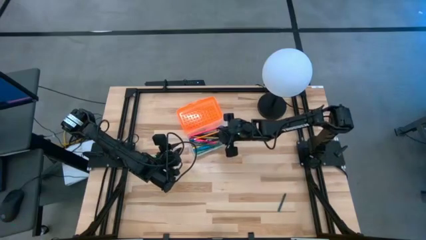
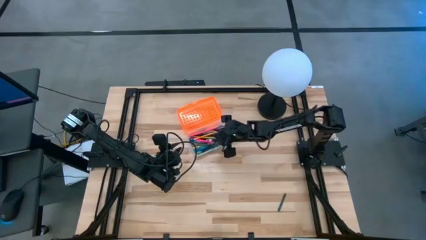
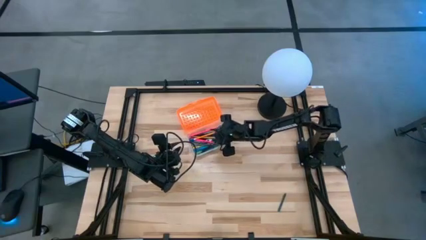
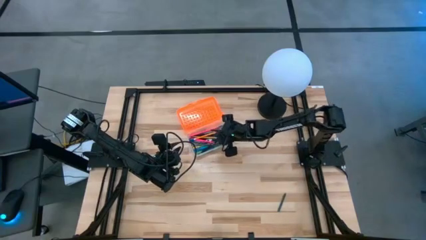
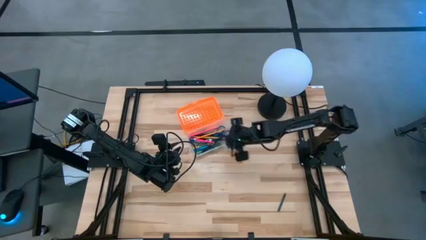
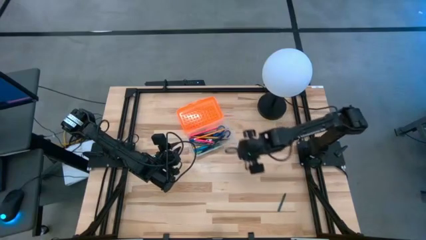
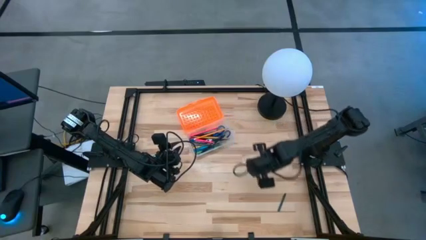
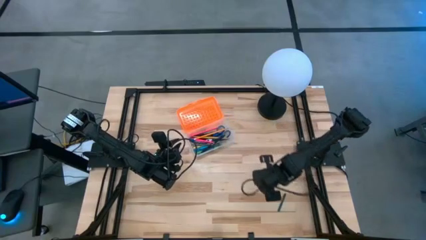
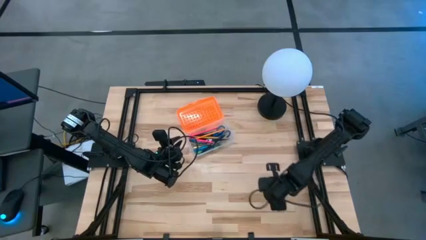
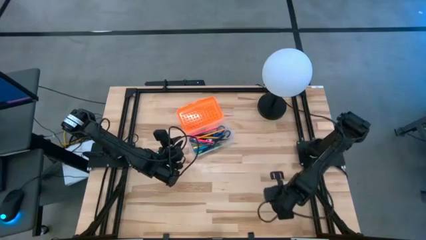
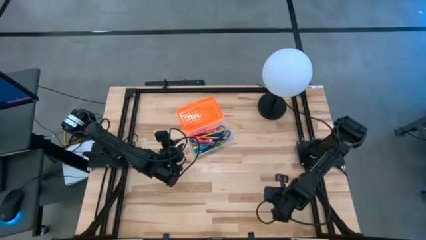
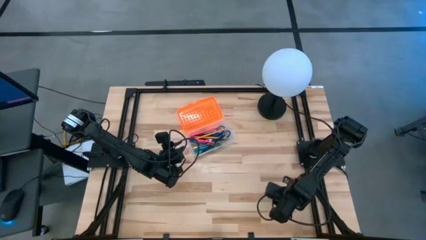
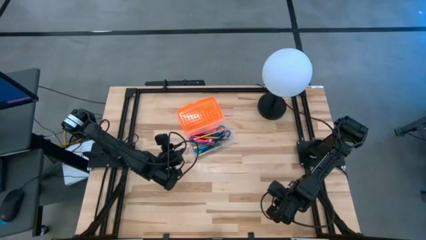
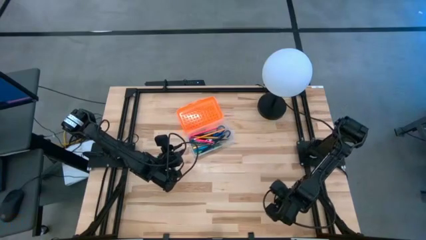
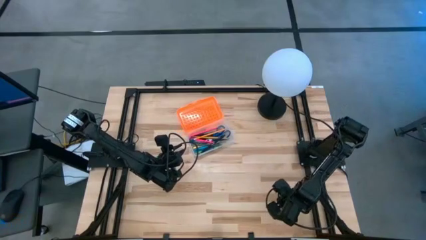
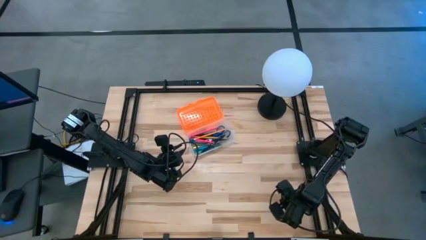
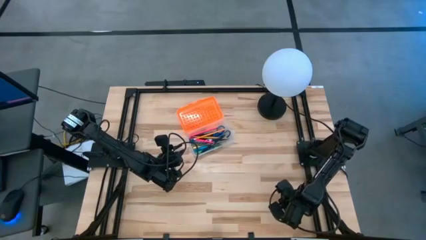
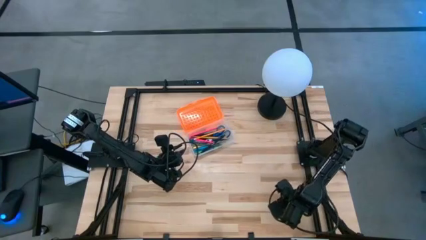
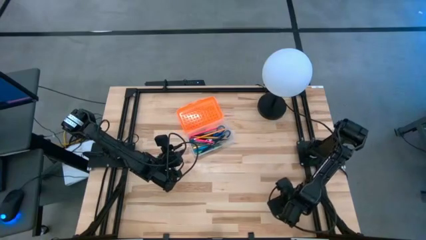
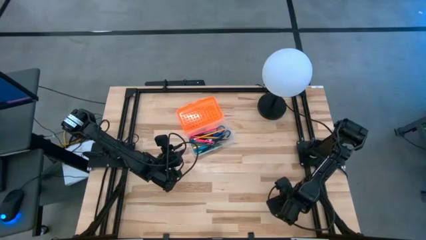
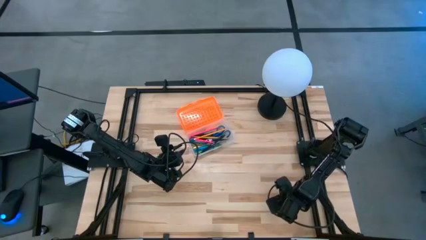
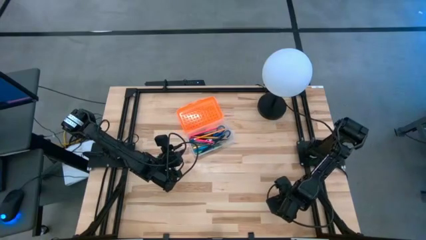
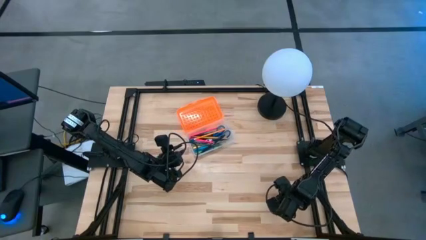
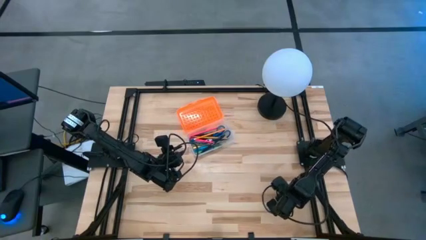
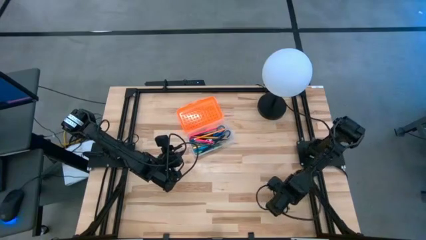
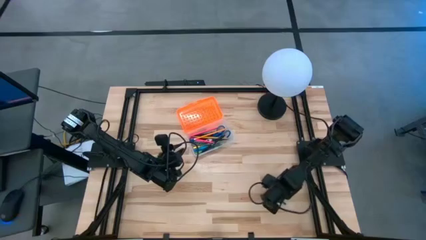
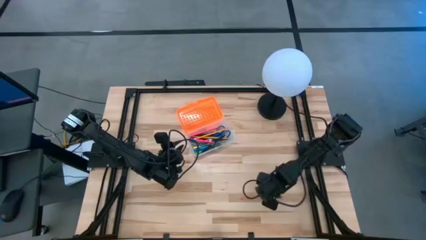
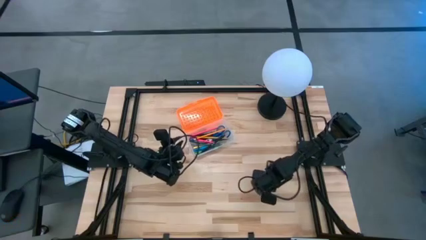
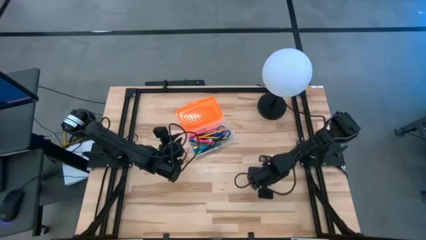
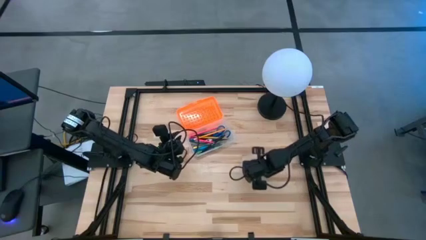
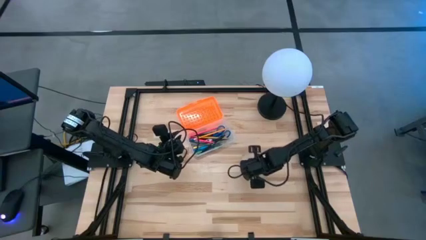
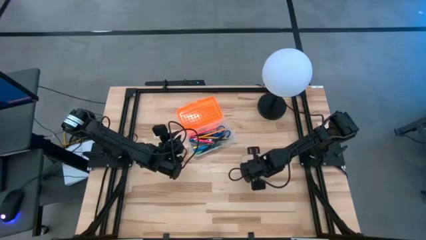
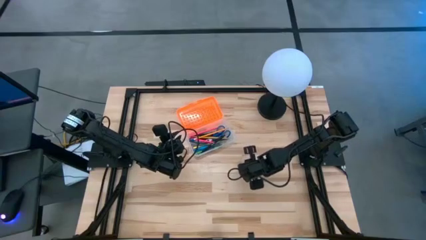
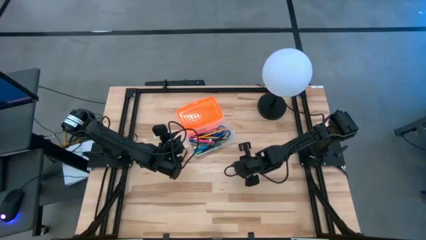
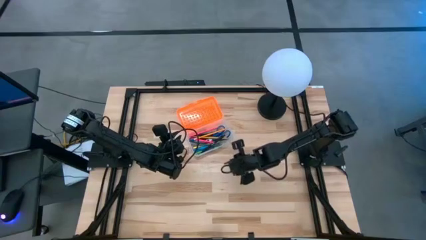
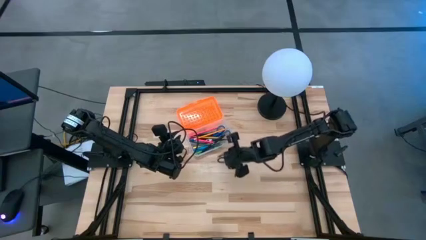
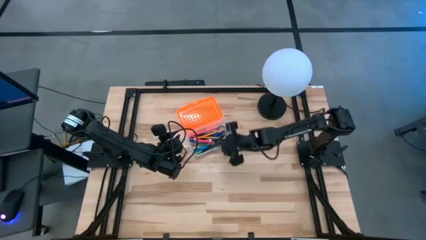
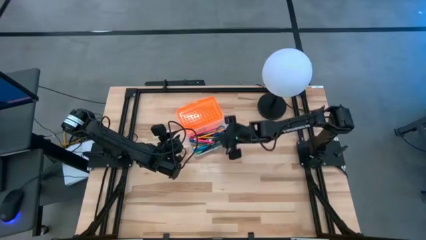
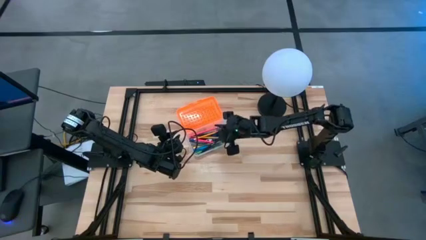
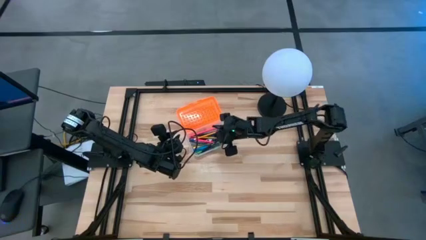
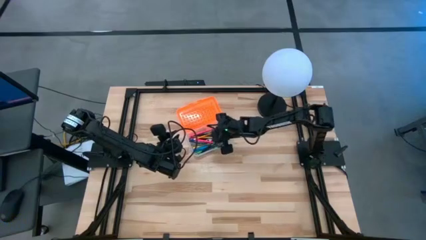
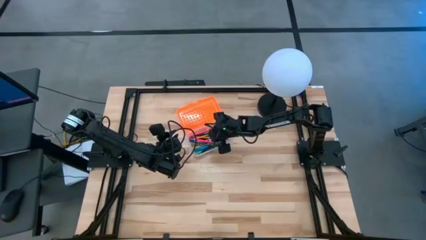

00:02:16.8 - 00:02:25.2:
Task: Pick & place school supplies into a supply box
Put the green crayon into the supply box

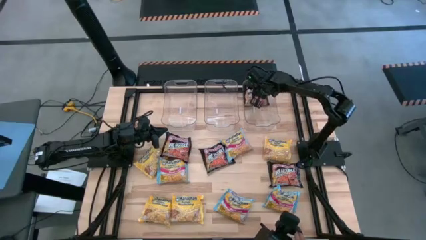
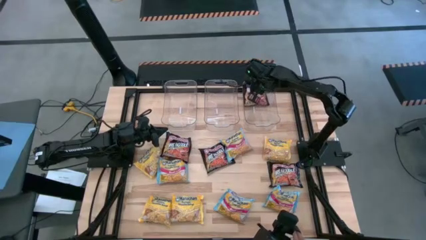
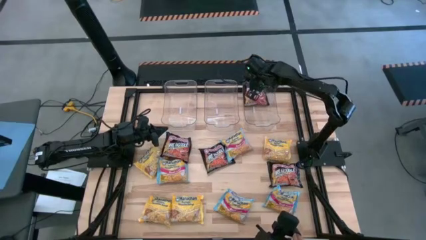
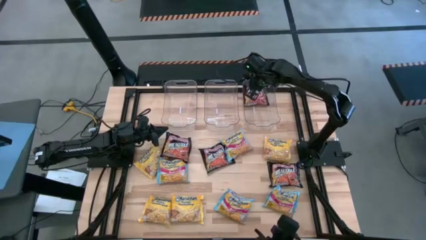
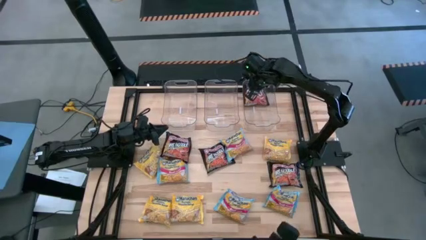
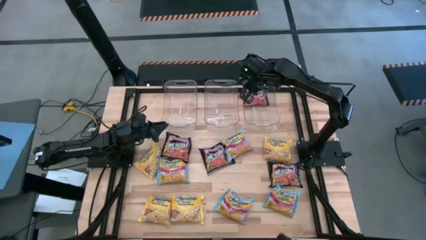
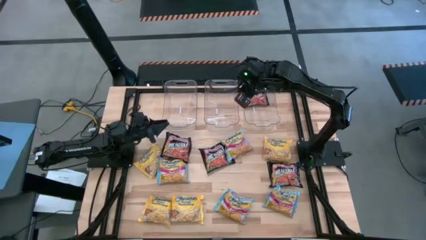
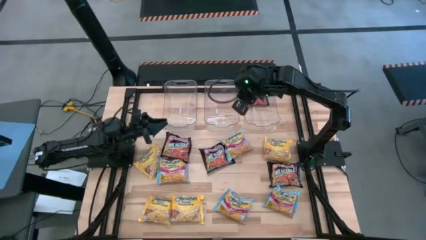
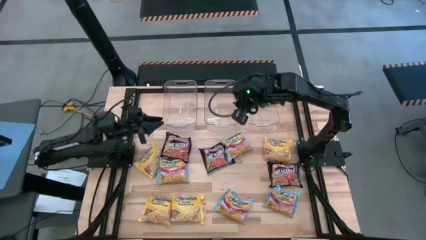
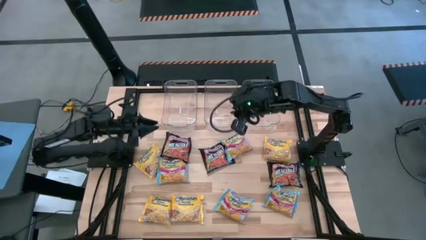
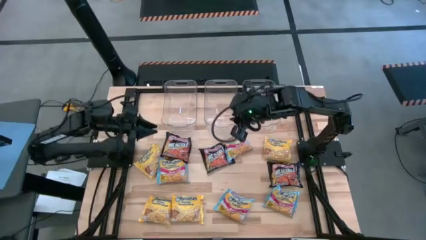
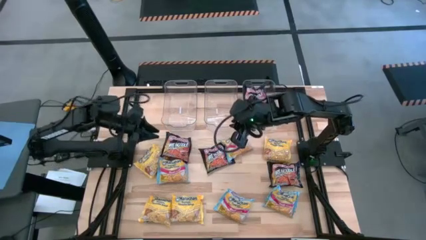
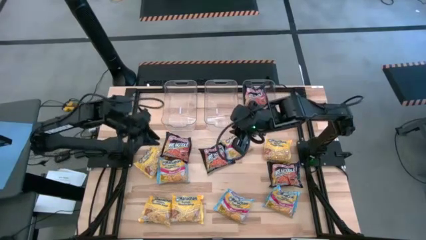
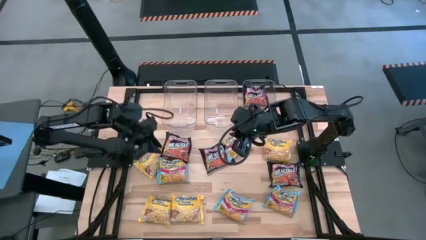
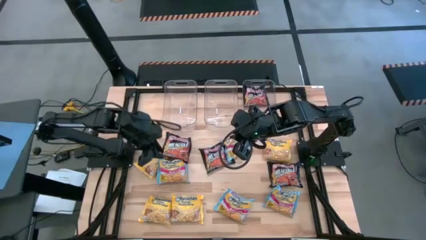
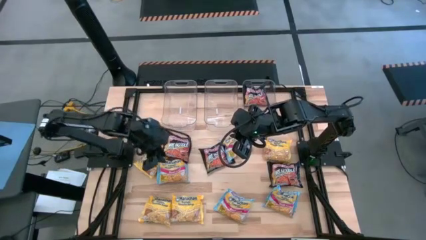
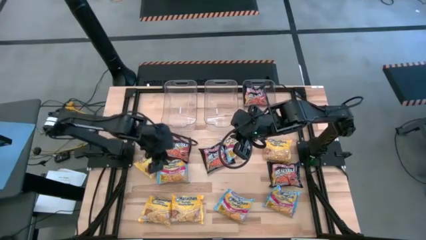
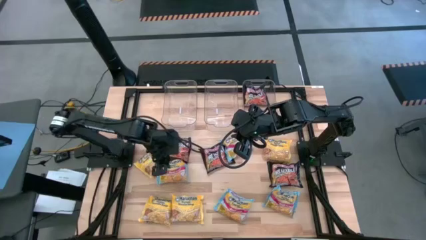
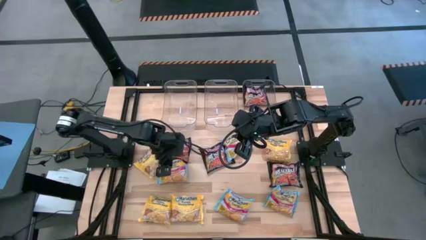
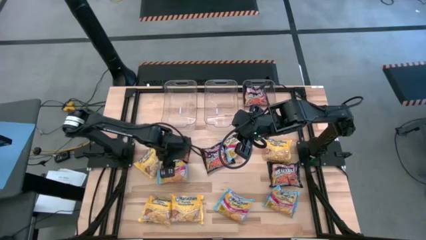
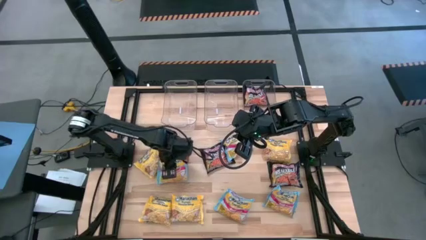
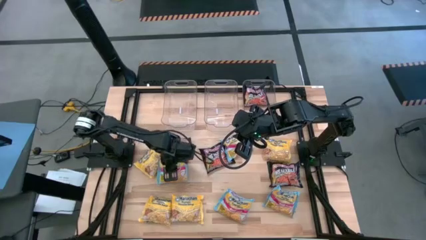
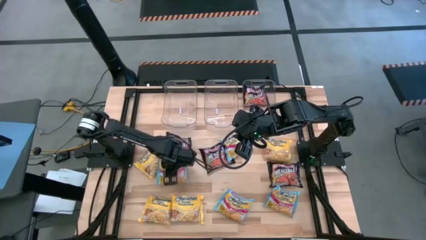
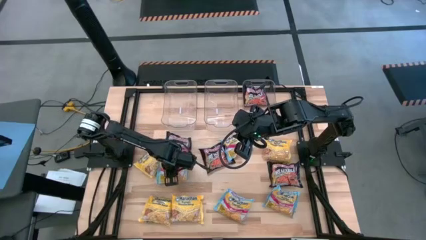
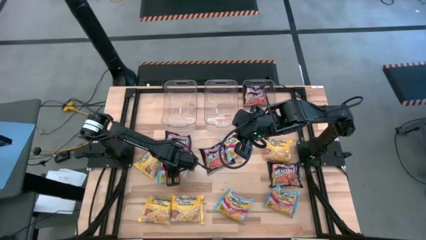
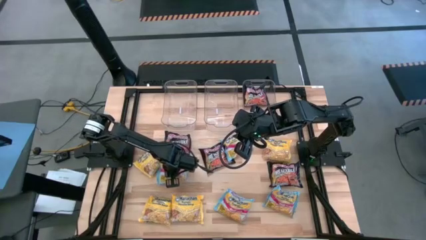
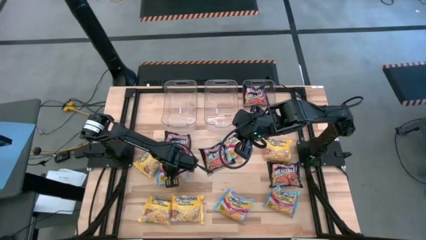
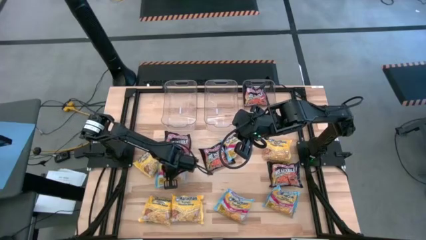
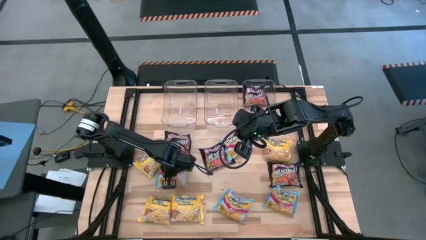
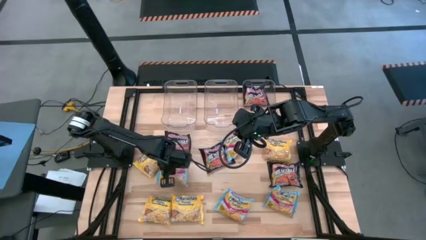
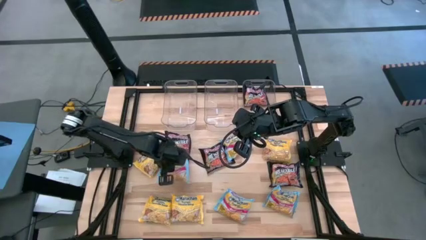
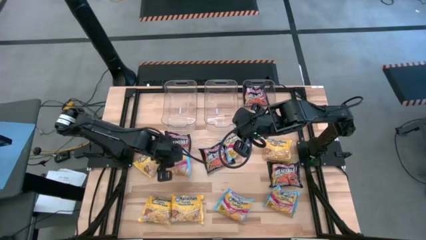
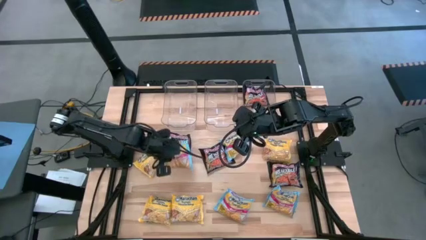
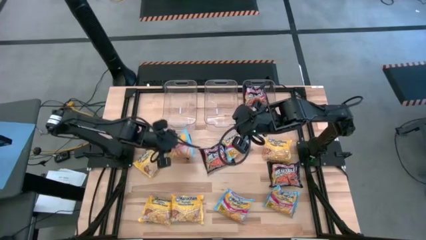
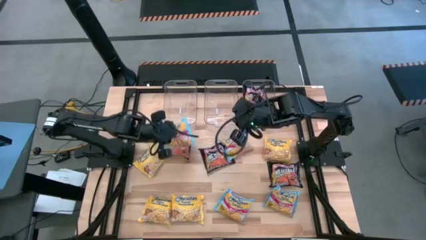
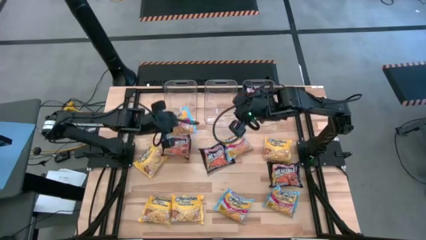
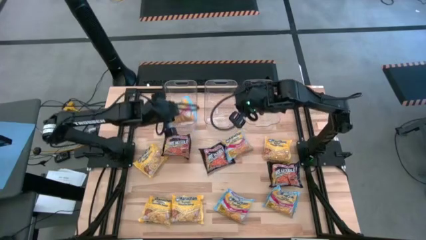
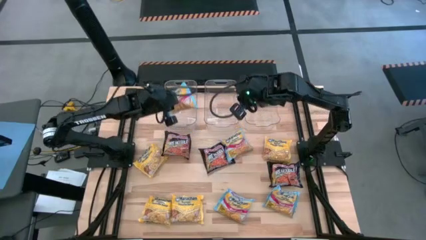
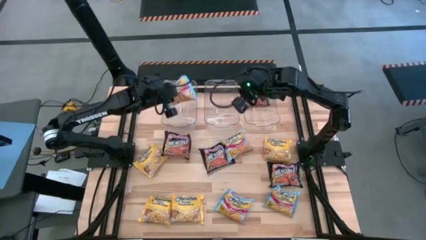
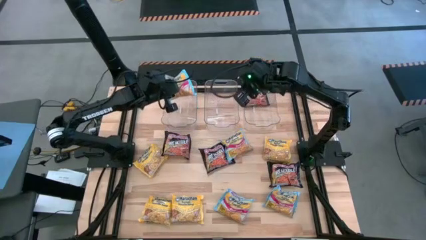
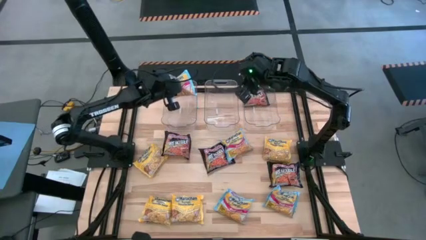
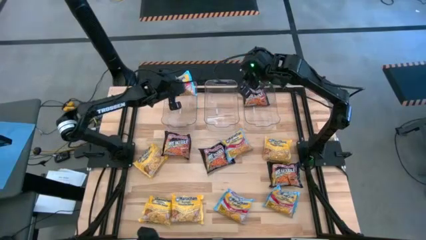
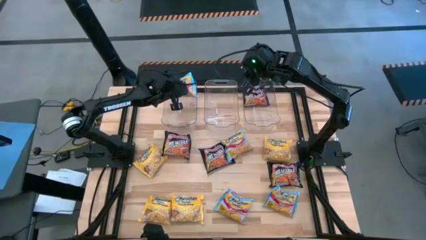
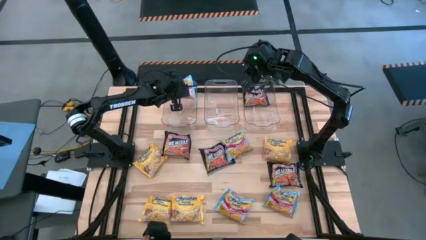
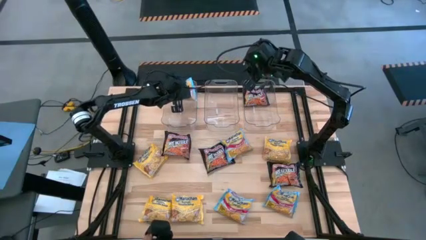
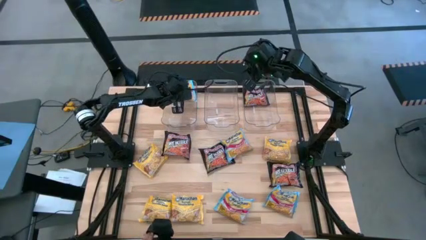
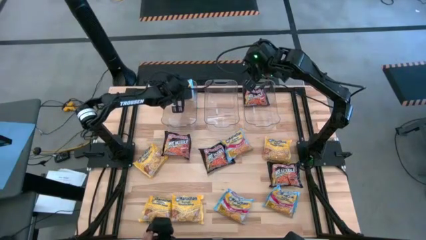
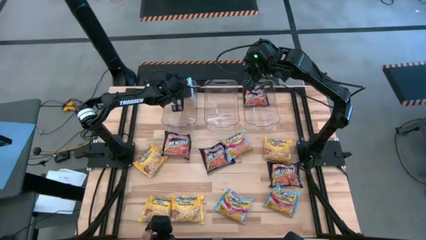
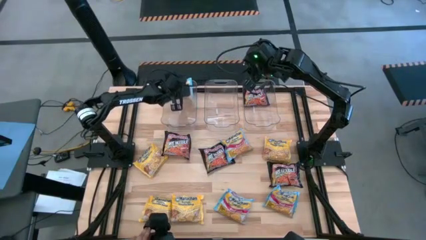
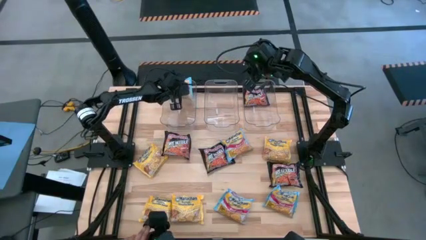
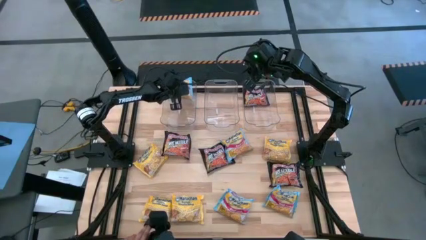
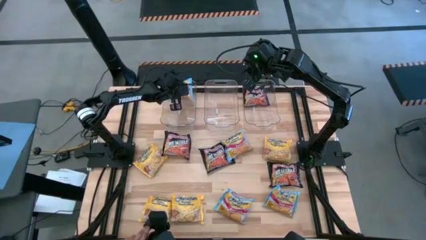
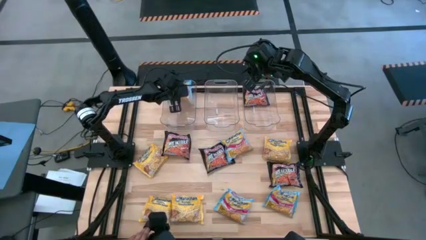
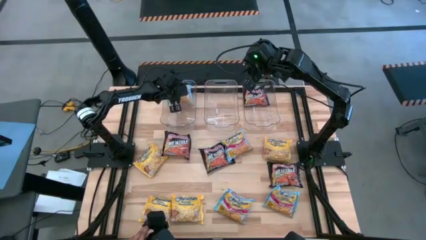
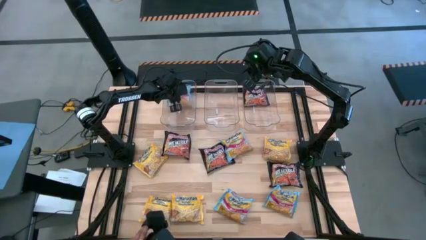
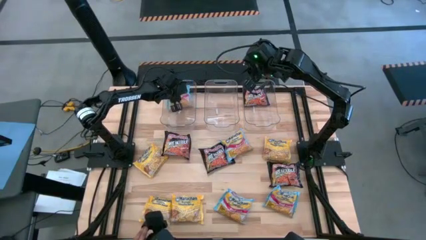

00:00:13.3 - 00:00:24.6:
Task: Sort Maruchan noodles
Put the blue noodle pack into the left transparent bin
